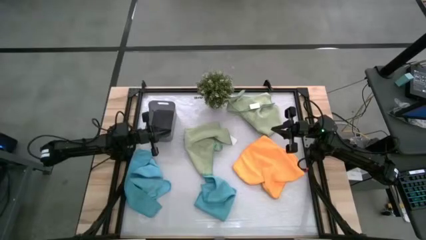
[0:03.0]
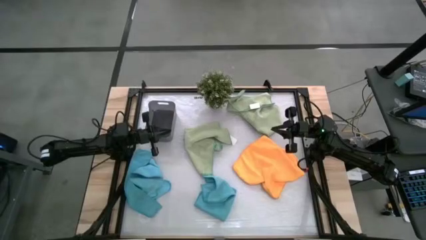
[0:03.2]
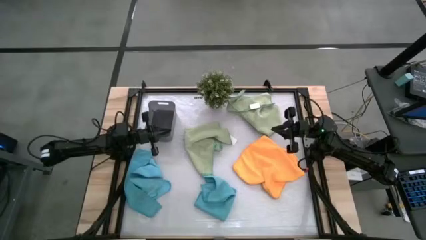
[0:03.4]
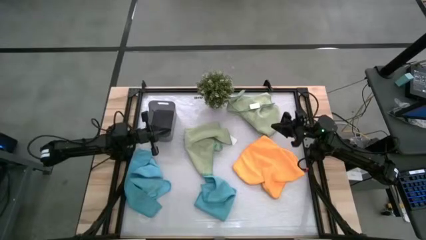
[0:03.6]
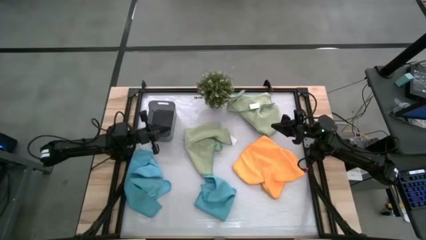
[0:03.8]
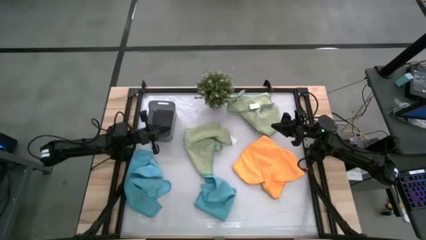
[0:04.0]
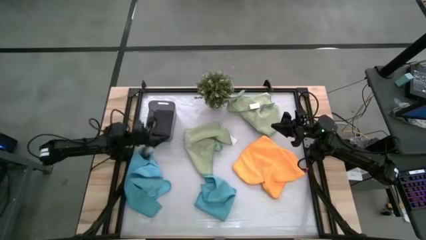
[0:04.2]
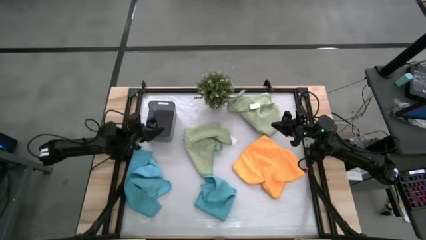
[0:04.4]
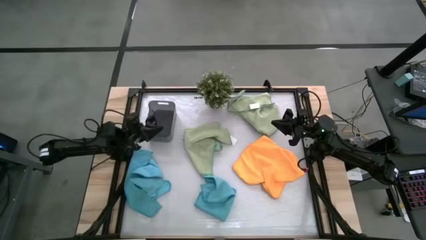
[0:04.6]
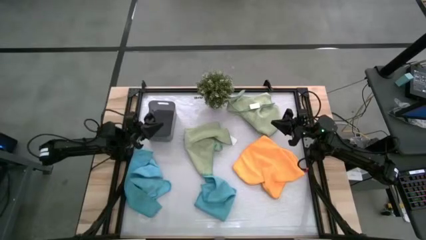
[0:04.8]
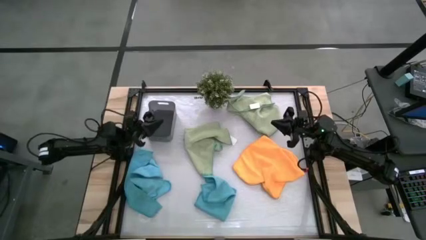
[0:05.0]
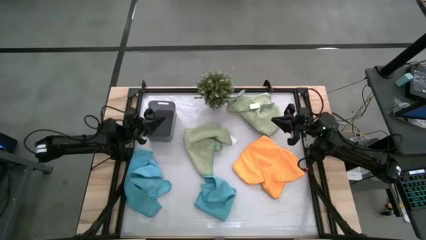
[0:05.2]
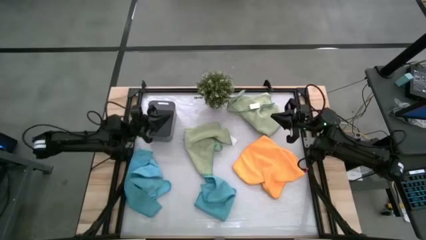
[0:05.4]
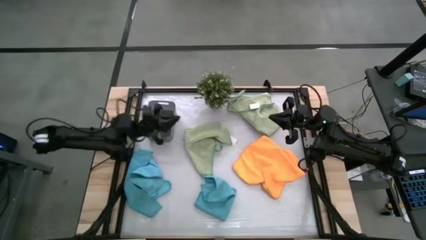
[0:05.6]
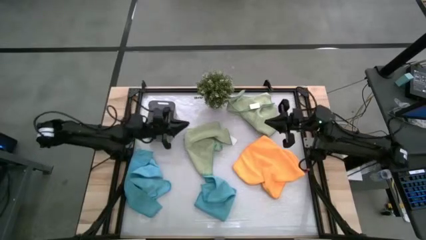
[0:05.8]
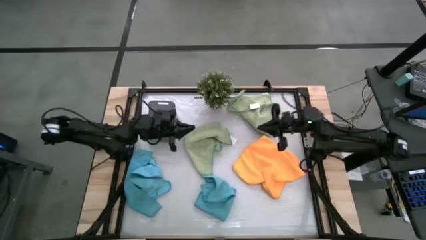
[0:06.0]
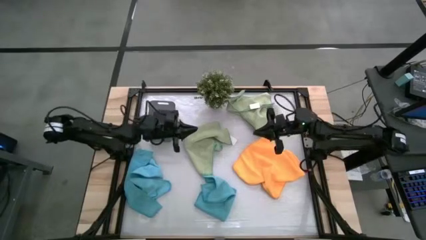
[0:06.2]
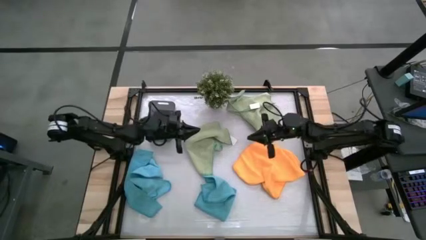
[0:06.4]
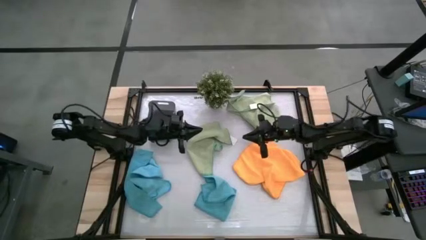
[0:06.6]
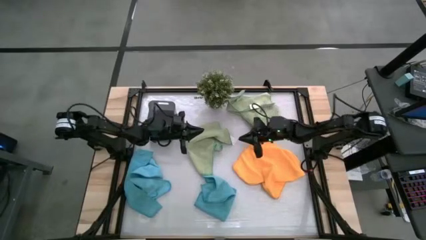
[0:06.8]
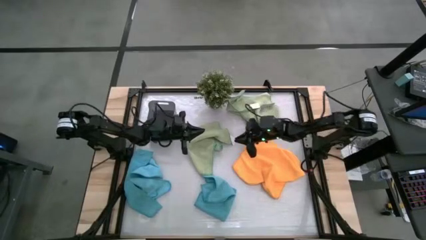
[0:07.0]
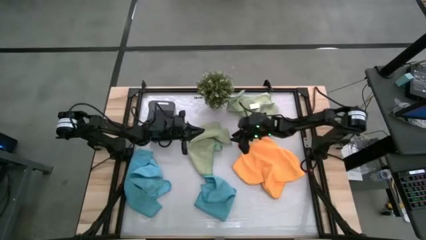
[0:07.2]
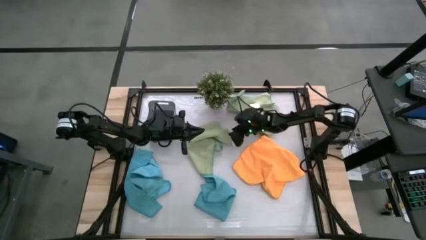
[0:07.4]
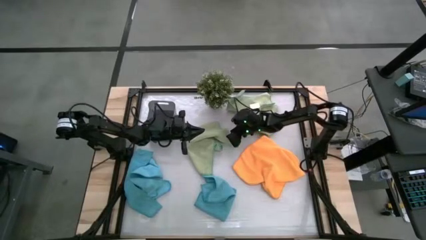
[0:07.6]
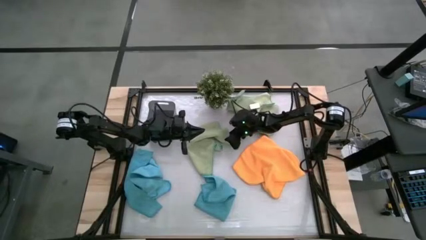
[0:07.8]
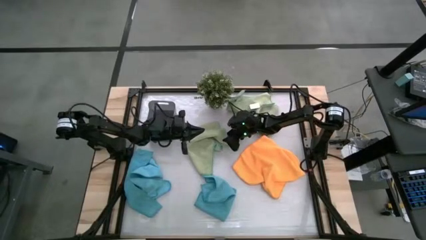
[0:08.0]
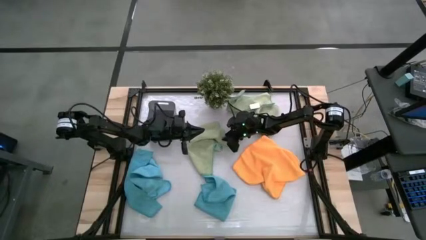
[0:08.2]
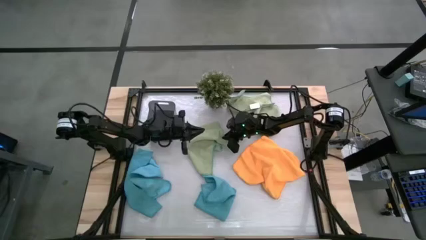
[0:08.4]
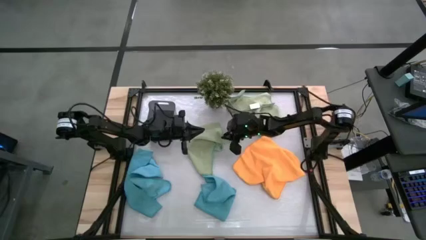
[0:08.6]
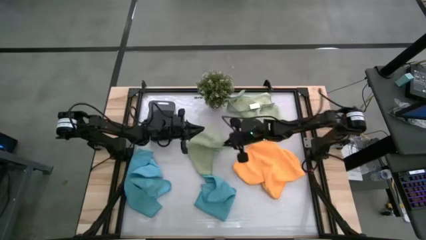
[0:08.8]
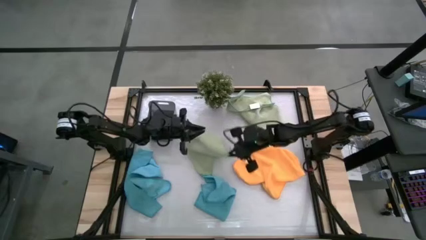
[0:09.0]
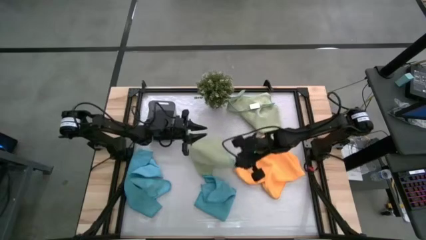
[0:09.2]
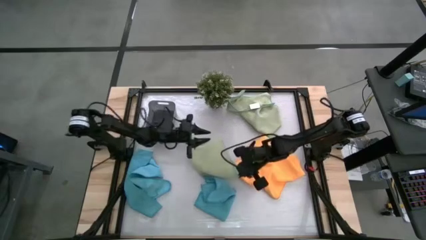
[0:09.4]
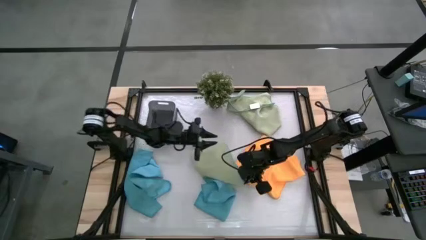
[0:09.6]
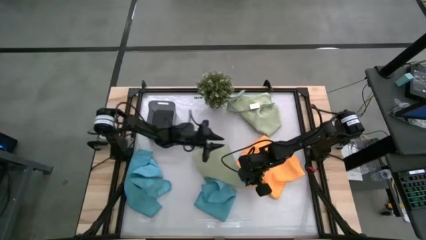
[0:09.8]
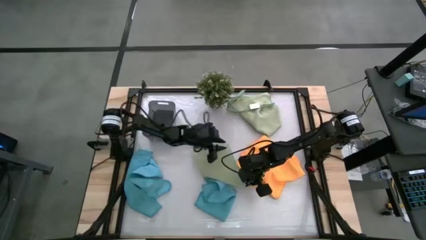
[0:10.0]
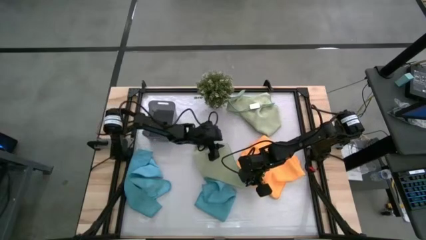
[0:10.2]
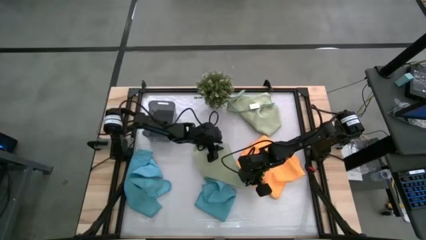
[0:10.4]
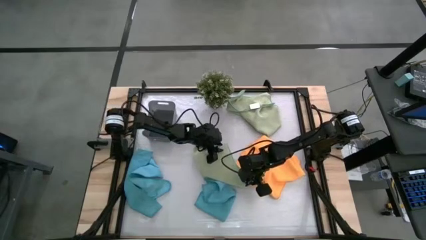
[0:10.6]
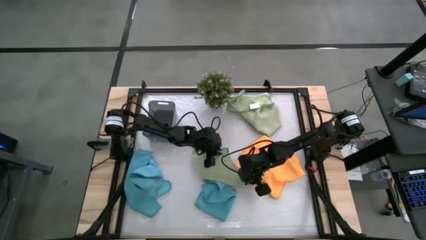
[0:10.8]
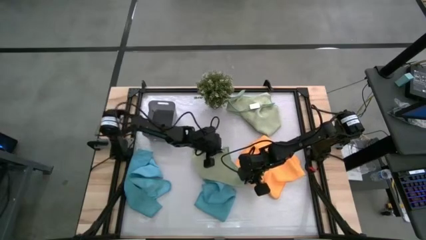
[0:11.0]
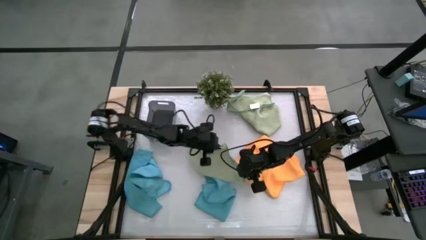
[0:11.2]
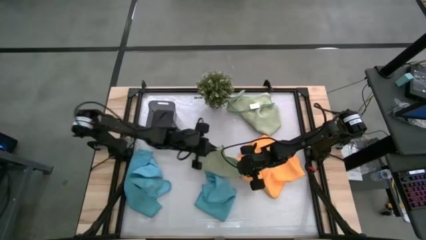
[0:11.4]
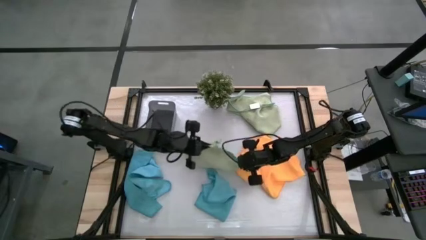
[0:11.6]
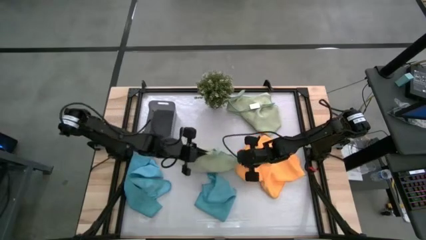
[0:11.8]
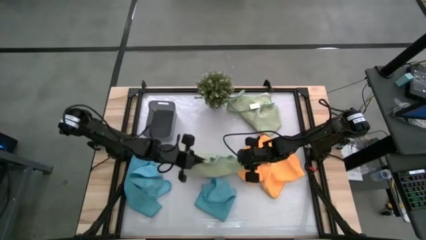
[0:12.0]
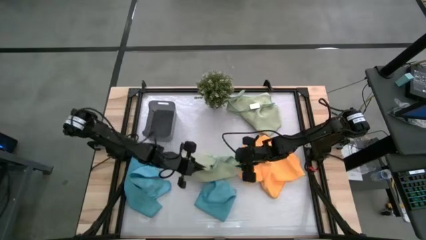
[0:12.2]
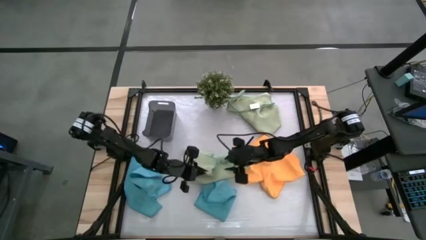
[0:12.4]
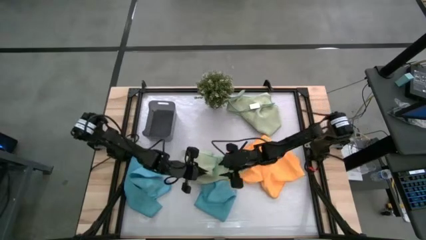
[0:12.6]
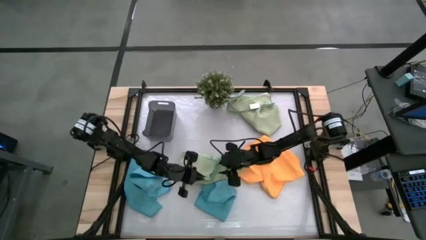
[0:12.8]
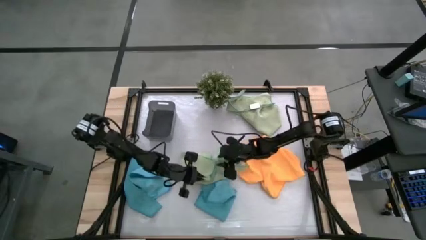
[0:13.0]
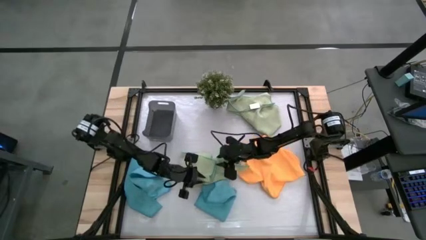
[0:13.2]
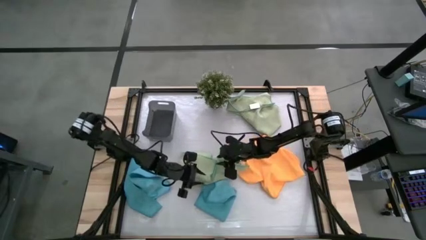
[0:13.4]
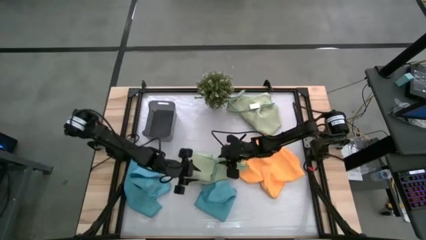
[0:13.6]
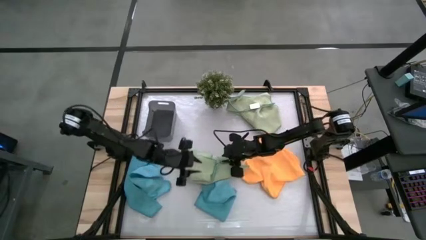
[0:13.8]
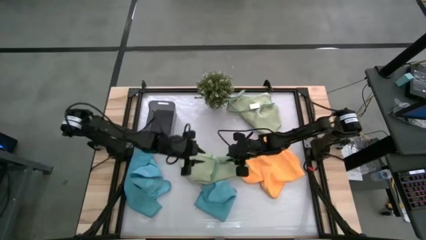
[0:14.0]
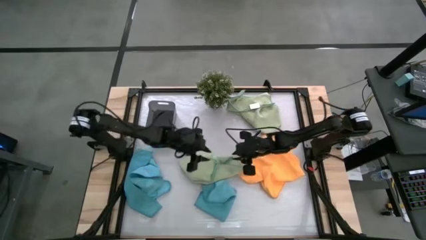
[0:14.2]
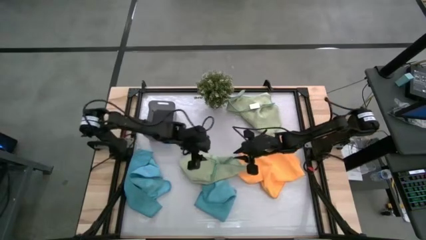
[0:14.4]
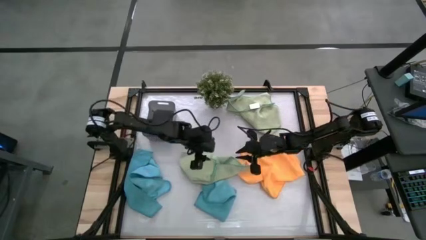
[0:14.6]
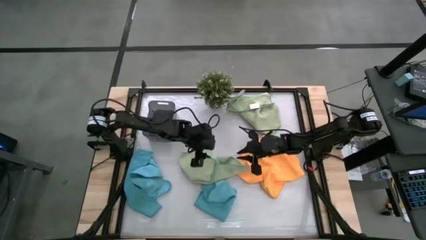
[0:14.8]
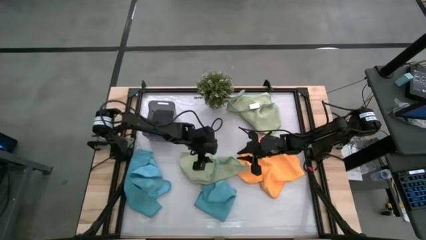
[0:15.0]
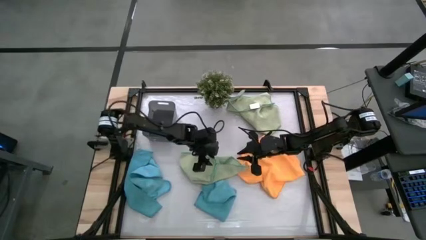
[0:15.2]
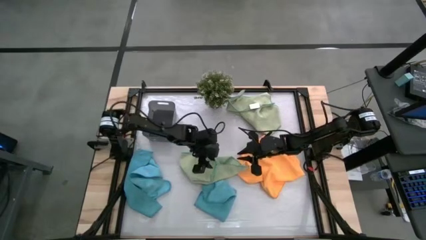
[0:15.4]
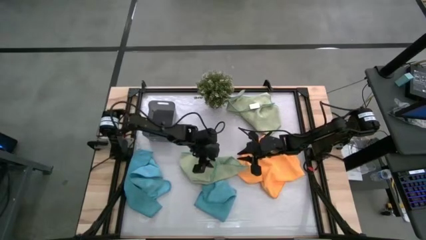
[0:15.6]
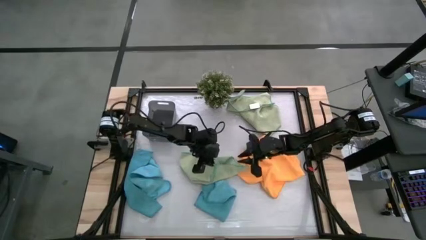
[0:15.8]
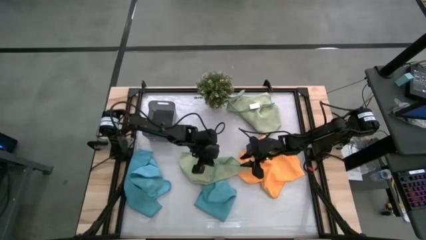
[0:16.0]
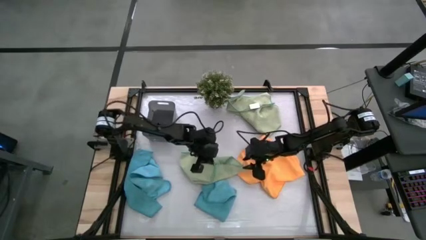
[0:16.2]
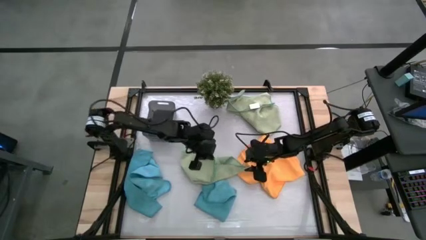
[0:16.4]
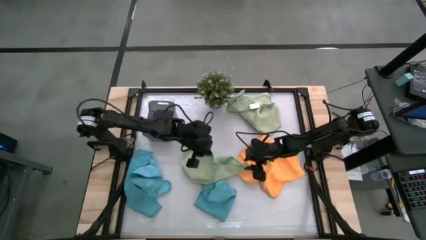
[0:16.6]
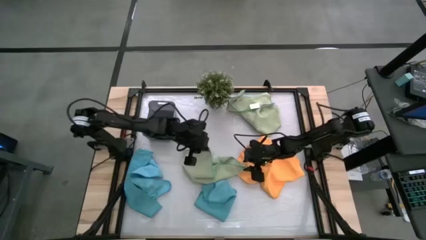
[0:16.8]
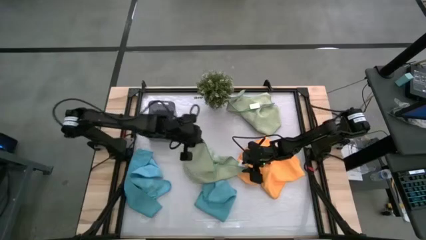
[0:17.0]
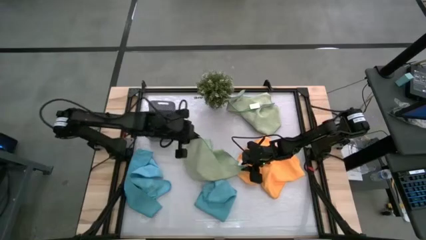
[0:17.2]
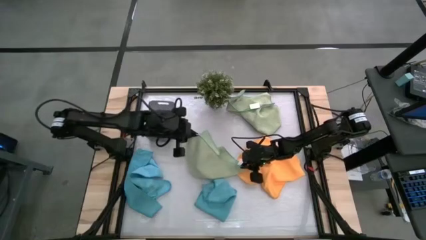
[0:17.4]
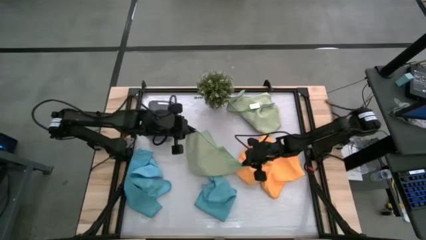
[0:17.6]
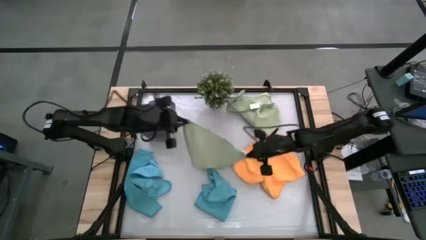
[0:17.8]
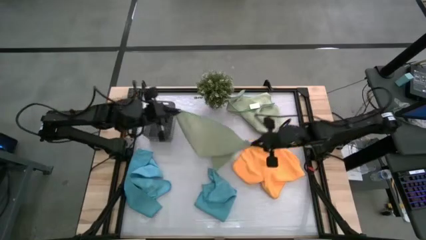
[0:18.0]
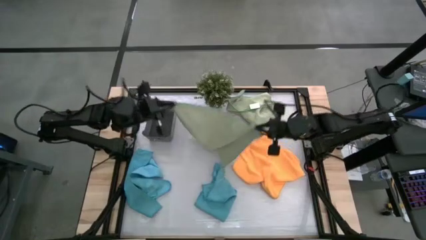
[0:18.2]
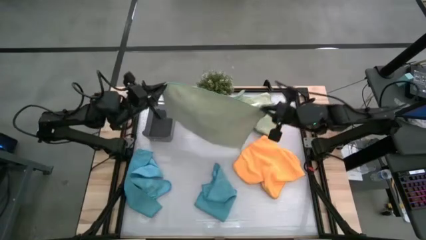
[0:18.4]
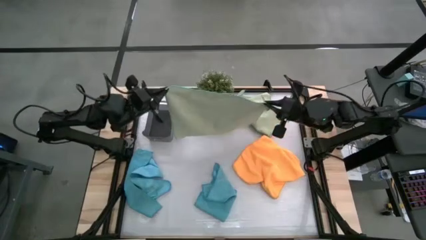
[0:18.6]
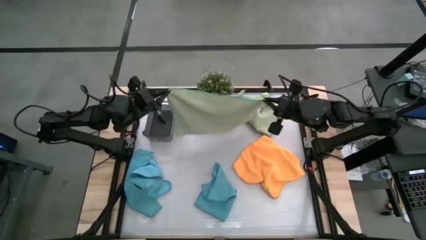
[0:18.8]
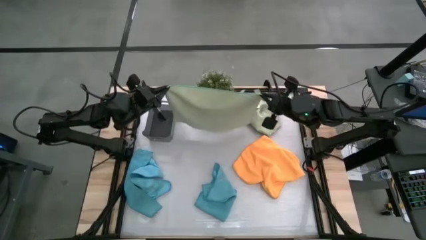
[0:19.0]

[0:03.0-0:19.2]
Task: Fold microfiber towels
Fold the left green microfiber cloth
